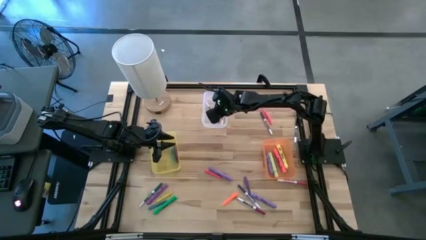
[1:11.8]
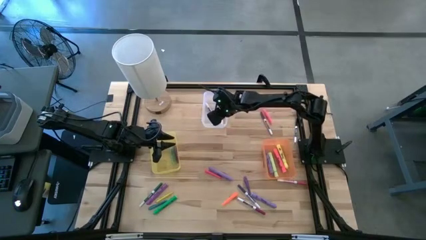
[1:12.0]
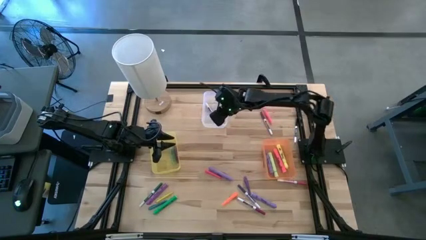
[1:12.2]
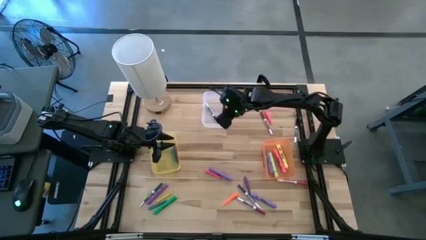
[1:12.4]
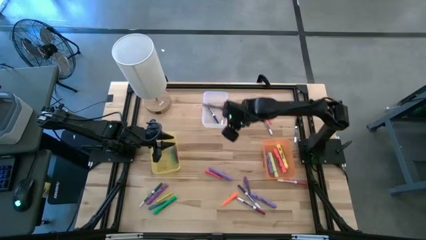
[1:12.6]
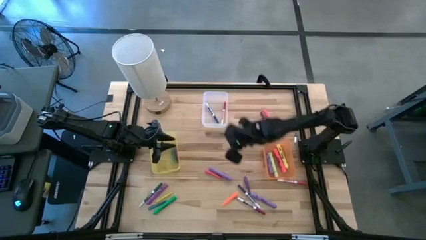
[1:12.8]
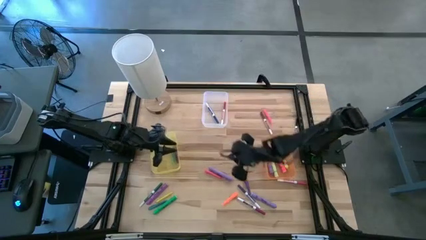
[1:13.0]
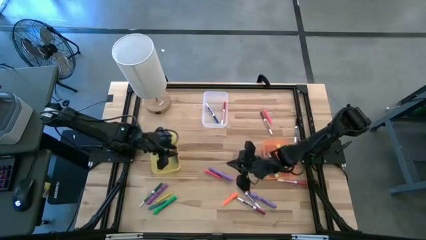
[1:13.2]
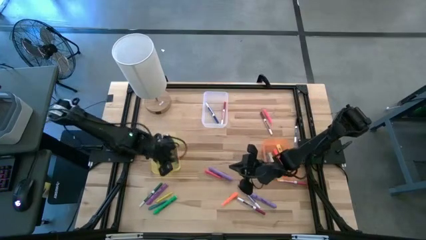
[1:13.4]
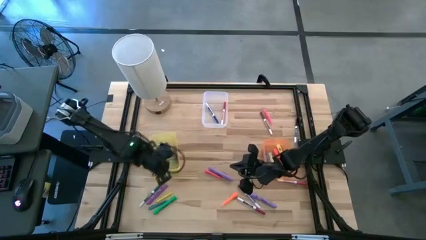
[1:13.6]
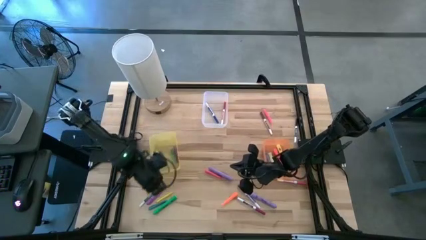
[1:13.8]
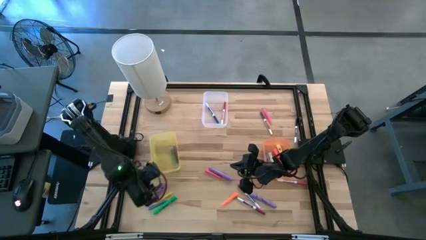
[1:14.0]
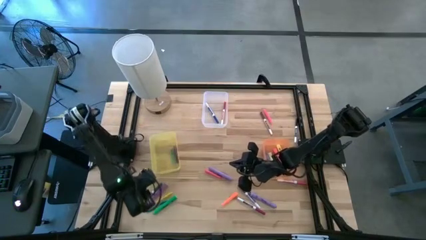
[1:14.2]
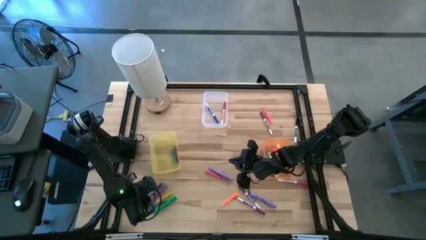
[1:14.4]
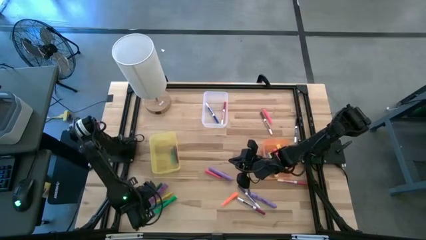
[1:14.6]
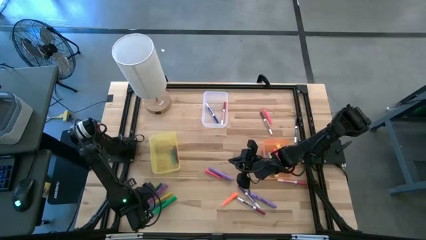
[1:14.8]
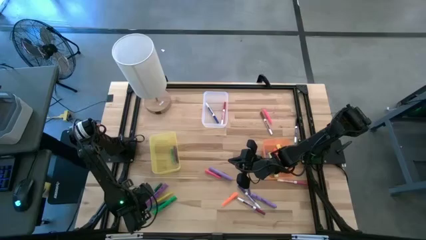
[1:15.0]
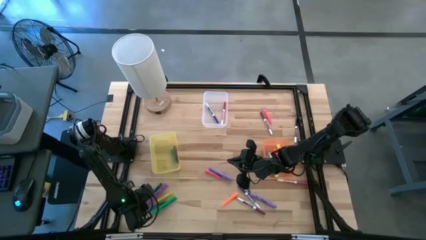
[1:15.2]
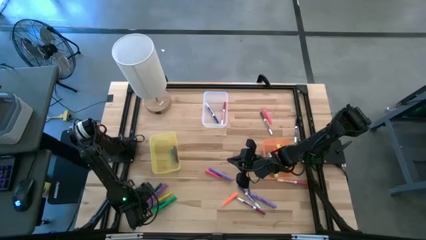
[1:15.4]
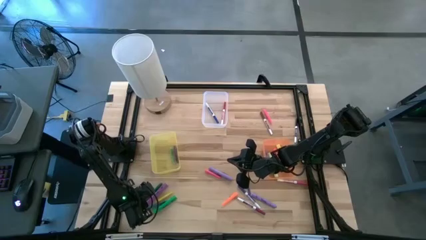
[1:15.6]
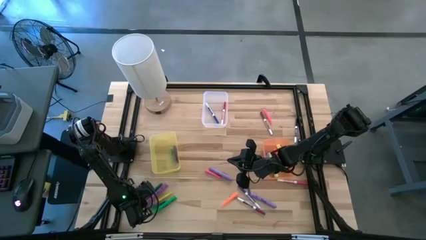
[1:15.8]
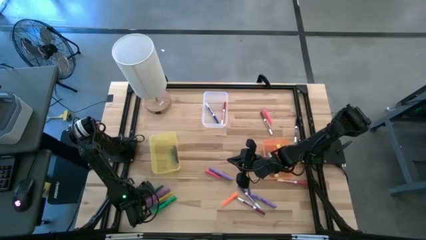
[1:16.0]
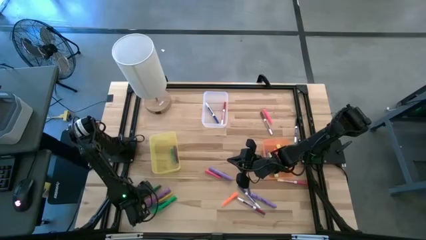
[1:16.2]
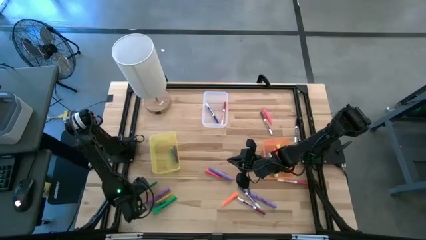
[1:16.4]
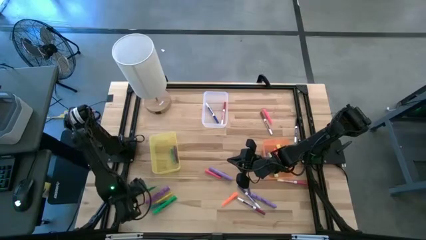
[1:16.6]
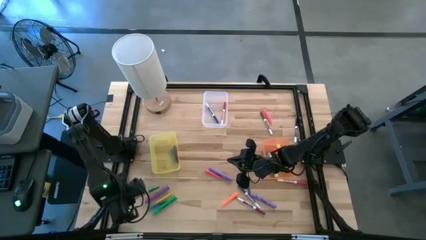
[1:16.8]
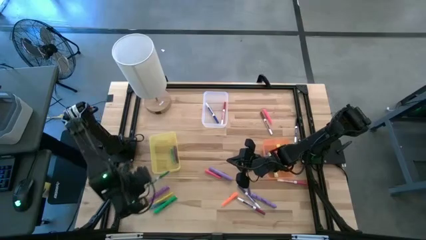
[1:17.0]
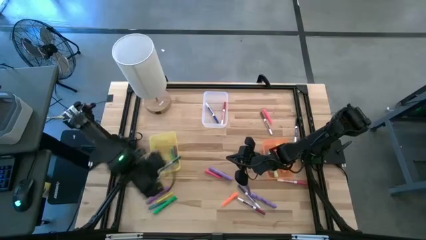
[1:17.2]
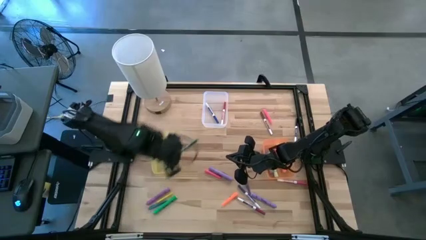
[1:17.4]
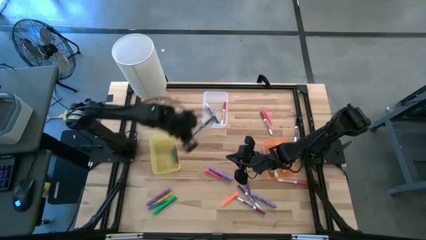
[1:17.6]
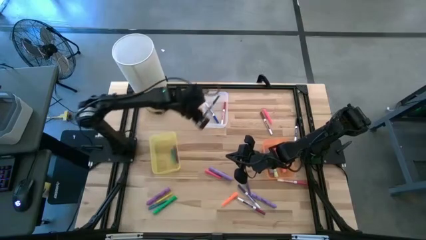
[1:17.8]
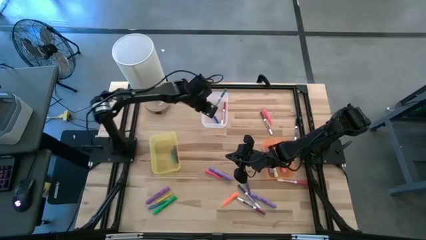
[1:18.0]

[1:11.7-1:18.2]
Task: Pick & Place Markers
Put the green marker pen into the transparent bin

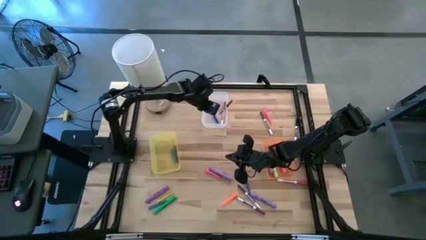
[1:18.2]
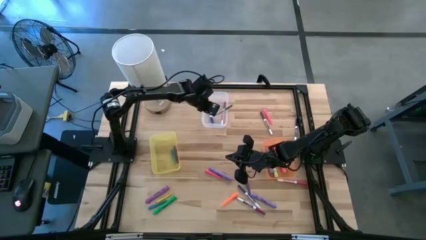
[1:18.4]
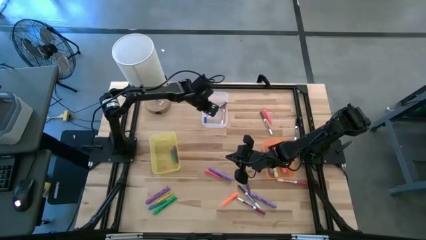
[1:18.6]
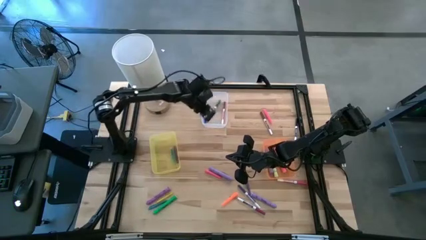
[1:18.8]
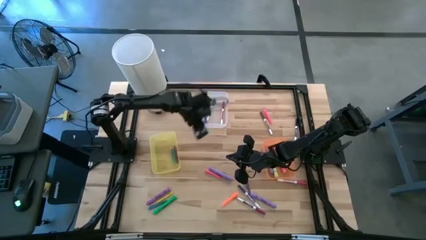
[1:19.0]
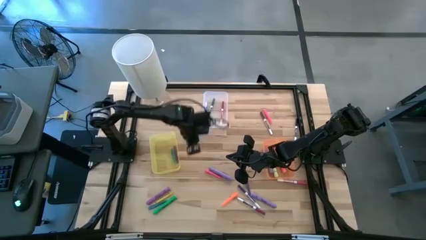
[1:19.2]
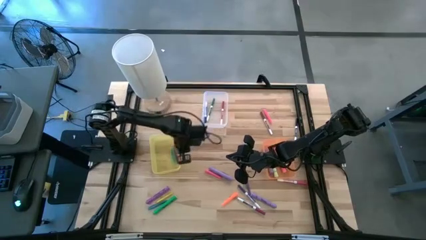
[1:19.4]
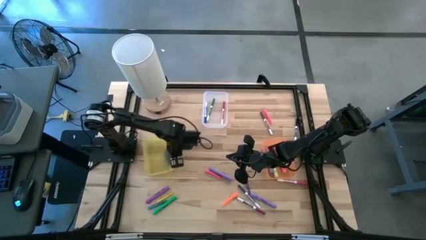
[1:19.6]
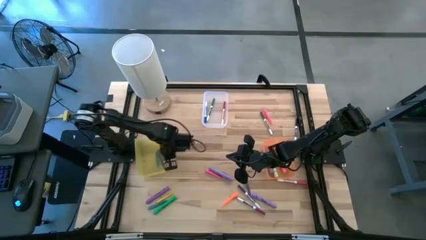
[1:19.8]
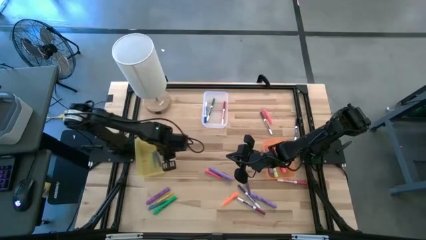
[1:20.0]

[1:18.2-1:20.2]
Adjust the yellow bin

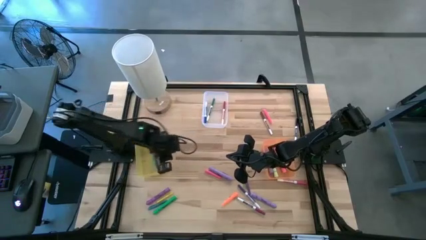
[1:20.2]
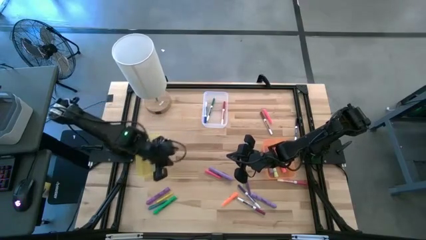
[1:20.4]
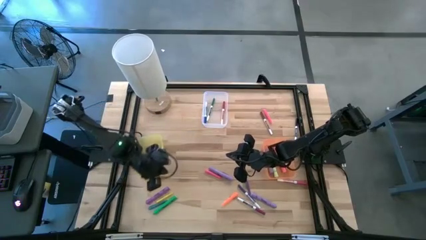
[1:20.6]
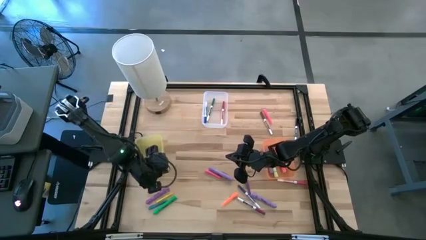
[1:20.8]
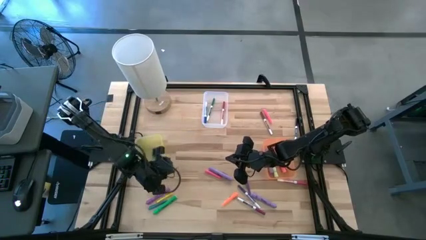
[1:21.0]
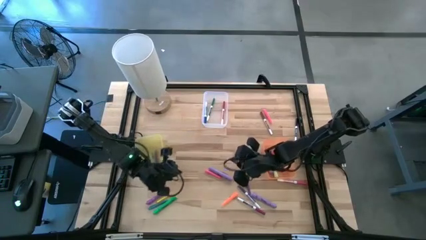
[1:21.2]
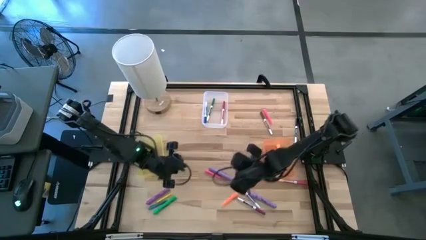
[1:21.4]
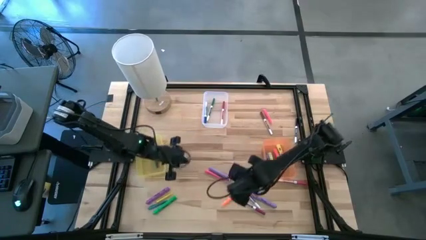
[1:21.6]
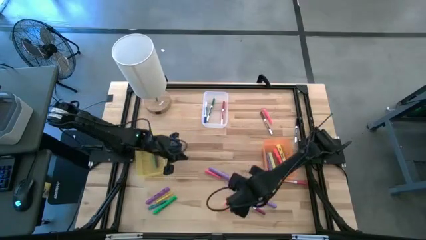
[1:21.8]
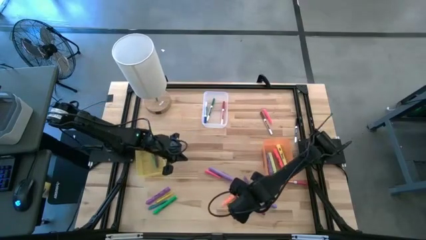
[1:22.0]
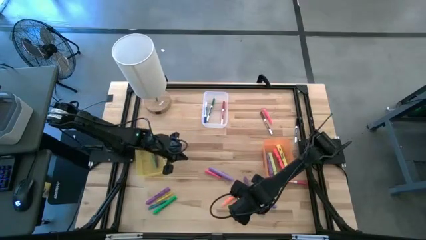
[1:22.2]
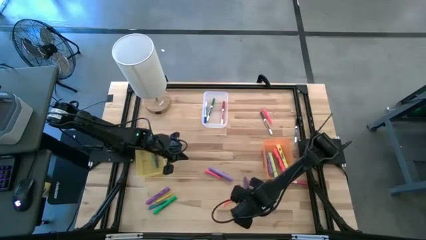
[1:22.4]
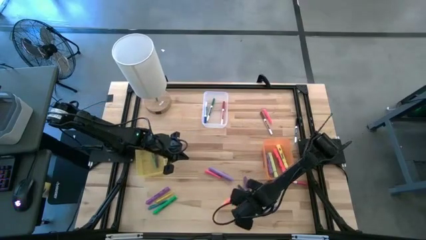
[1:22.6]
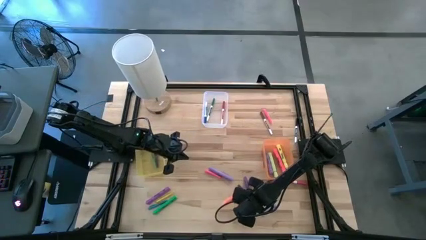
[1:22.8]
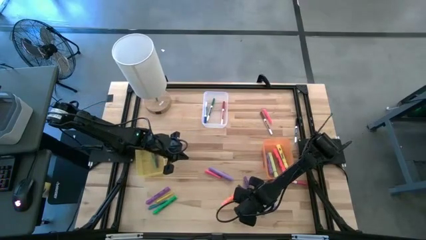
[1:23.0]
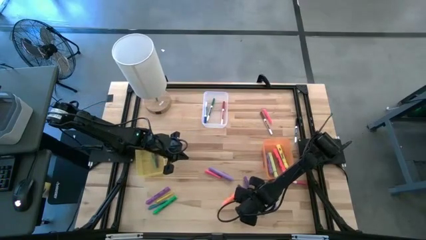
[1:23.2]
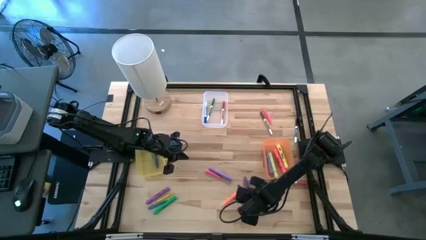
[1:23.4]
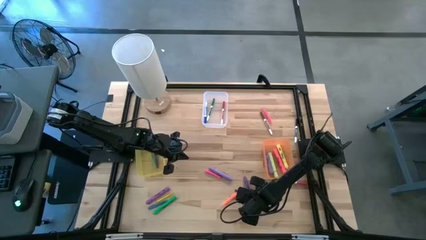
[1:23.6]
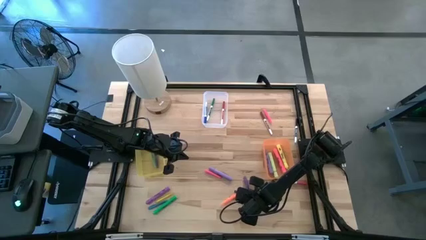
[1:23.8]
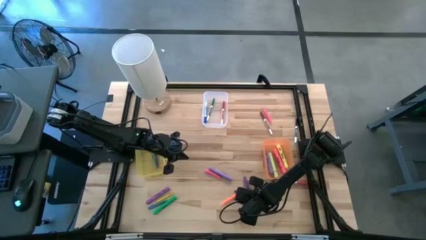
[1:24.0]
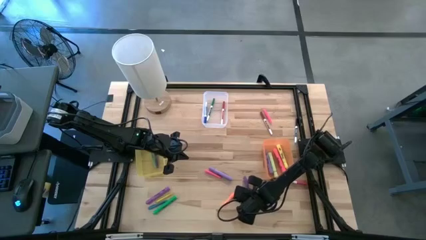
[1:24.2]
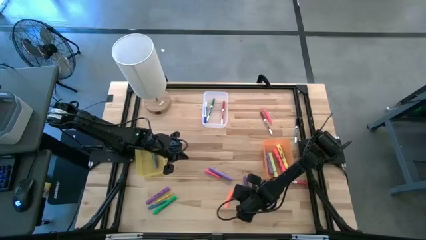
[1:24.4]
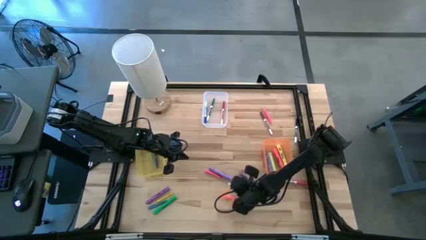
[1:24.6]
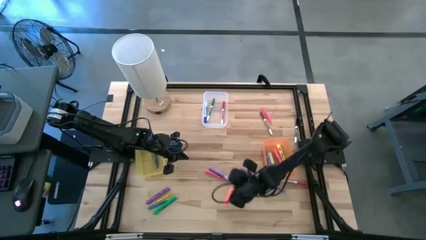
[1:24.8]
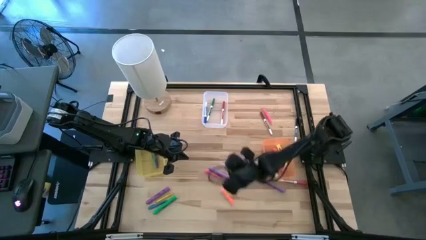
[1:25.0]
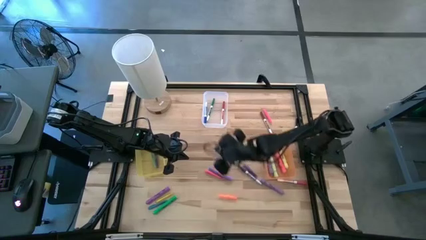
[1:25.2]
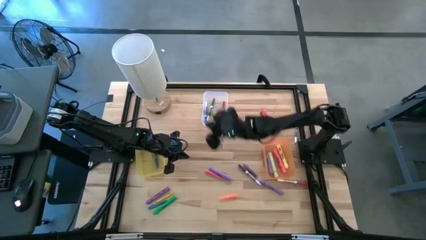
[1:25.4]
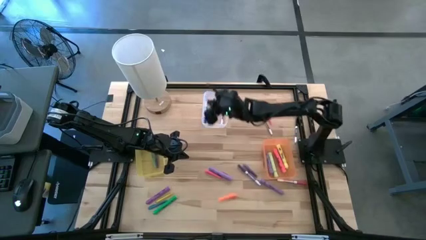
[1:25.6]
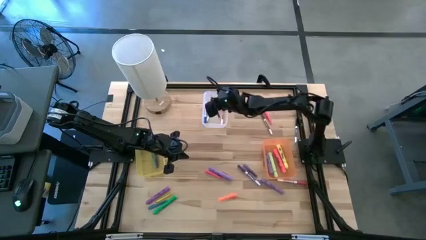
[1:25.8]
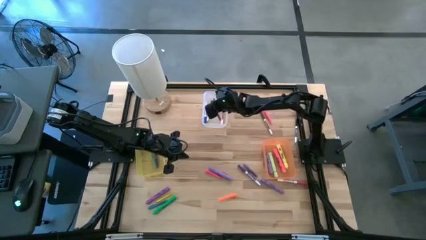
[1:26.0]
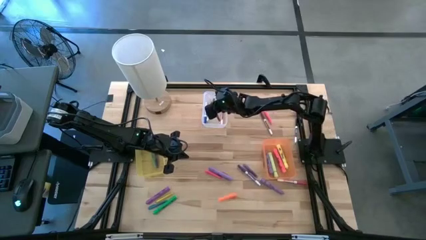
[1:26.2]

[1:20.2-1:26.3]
Put the purple marker pen into the transparent bin

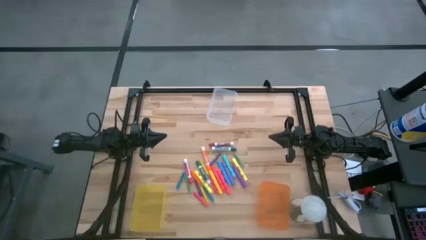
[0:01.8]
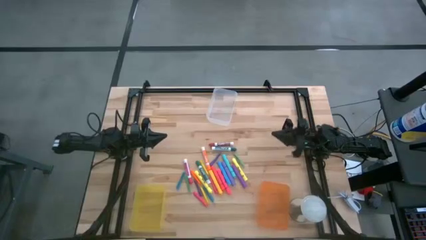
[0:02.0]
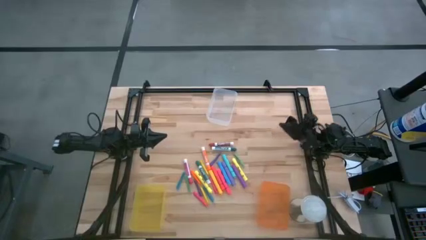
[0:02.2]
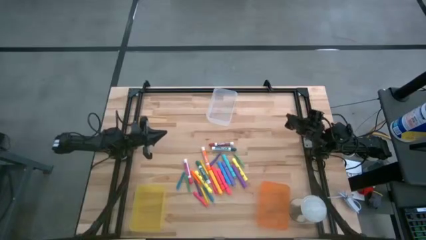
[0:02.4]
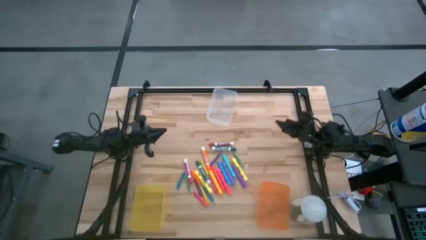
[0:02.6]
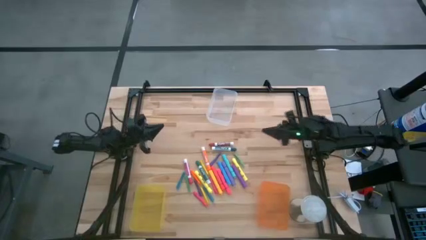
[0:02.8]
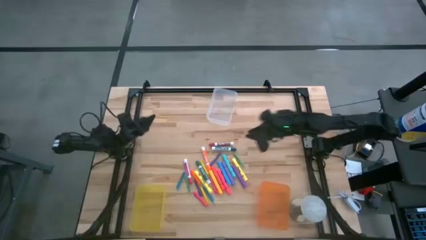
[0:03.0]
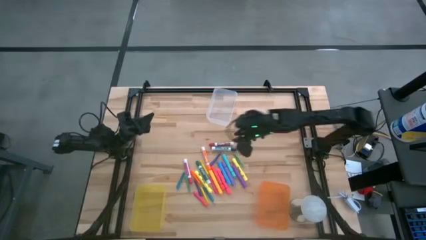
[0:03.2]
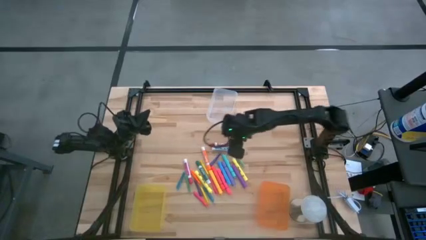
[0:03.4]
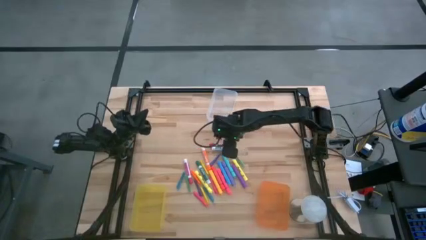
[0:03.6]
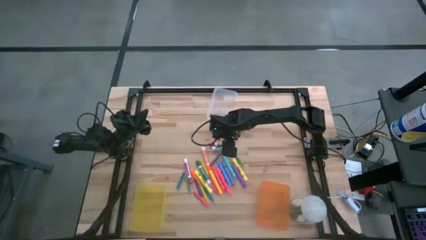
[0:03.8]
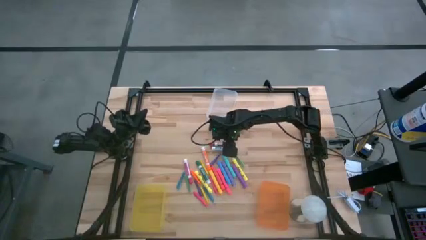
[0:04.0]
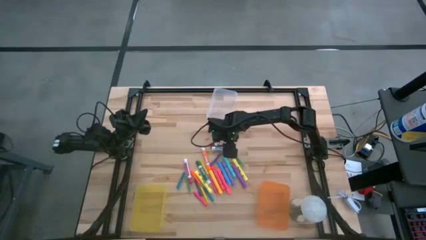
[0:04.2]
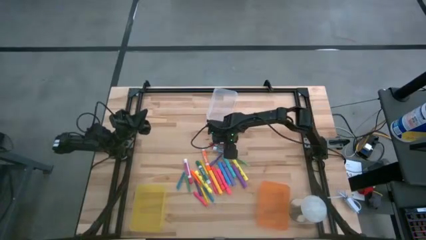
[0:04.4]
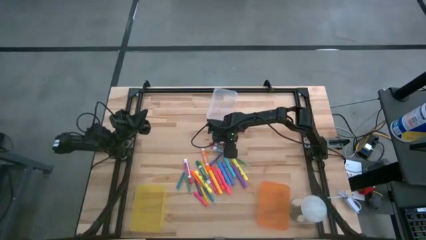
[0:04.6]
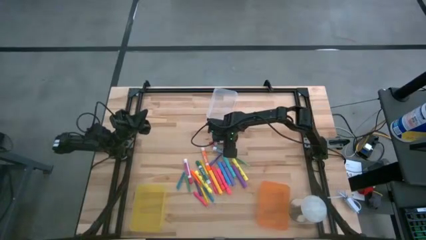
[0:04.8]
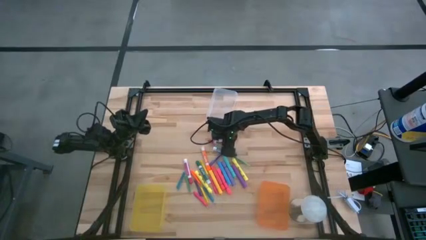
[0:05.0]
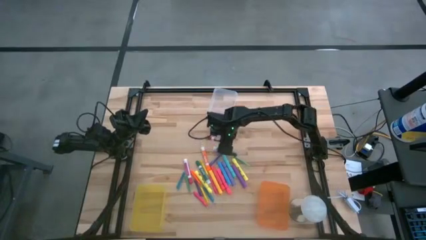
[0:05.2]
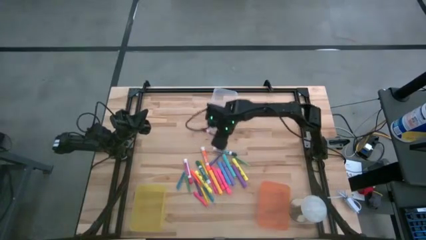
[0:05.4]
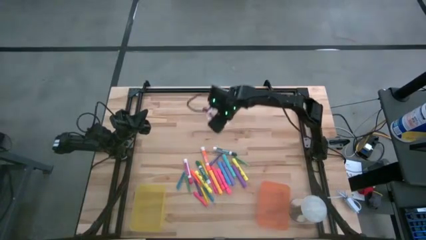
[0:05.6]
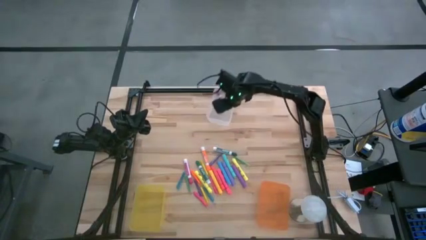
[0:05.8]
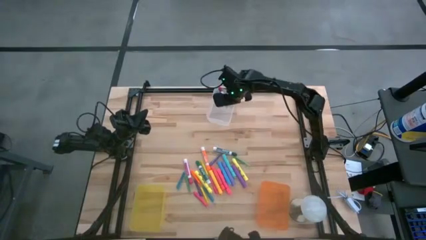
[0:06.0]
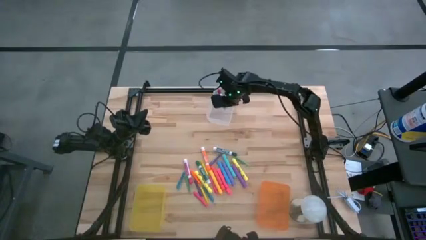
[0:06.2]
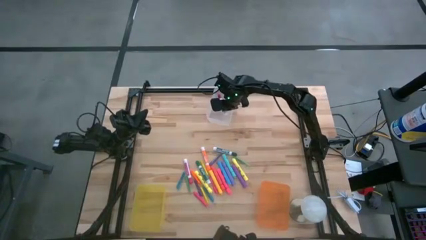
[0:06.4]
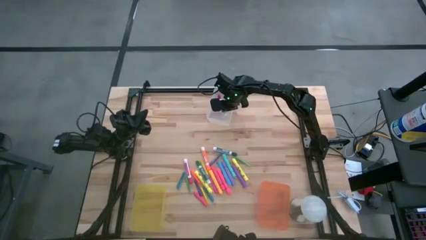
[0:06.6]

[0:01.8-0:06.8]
Task: Pick & Place Markers
Put the red and white marker pen into the white bin
